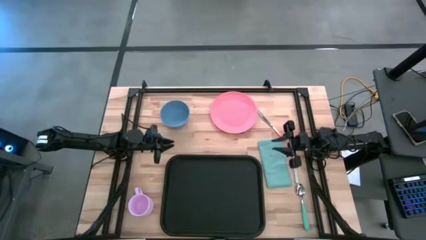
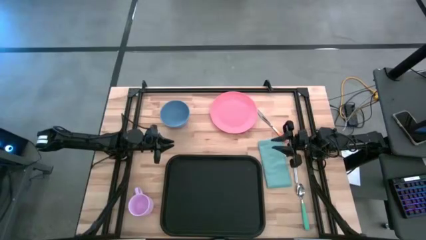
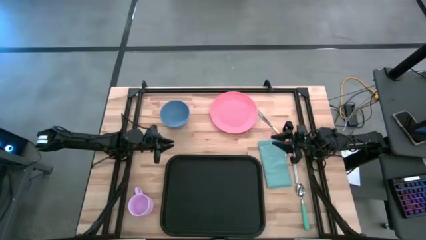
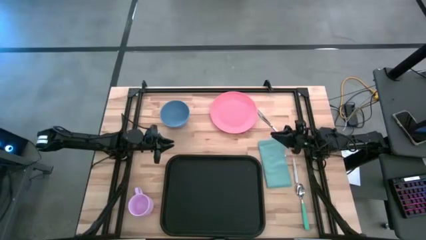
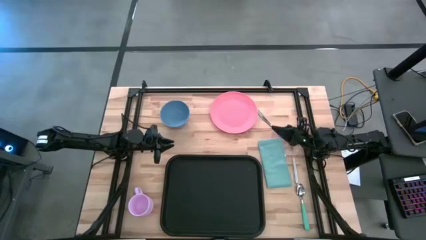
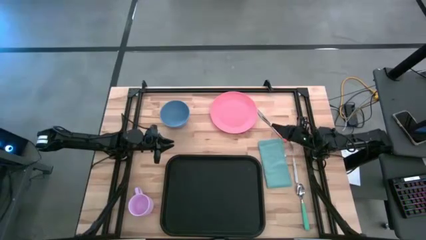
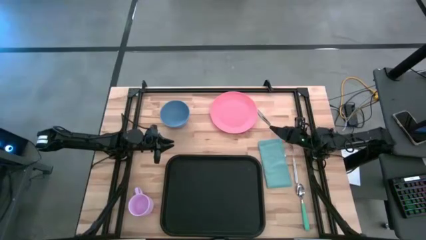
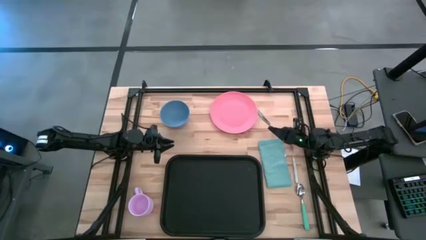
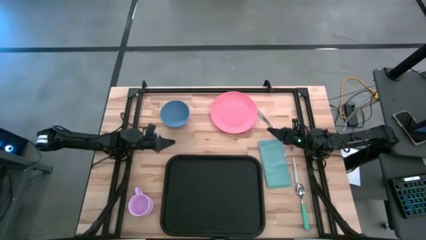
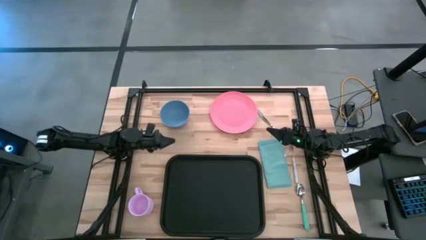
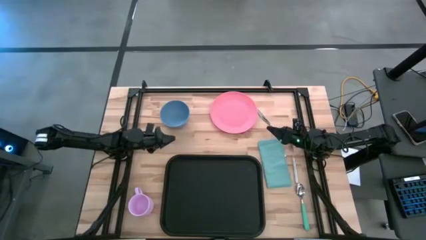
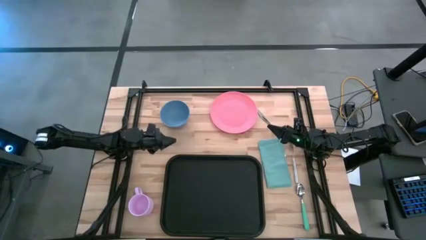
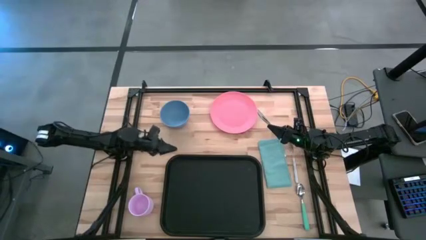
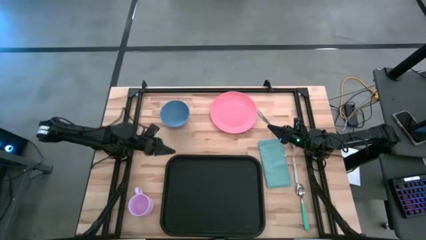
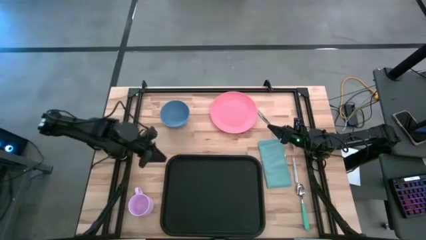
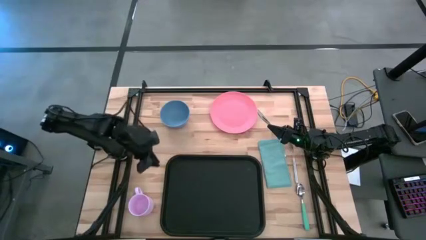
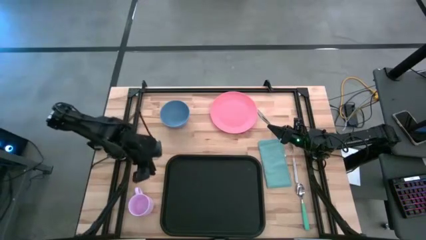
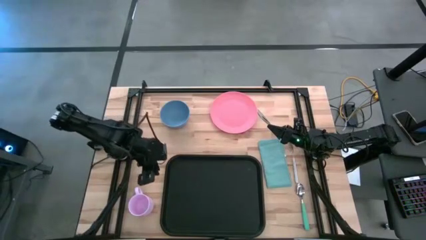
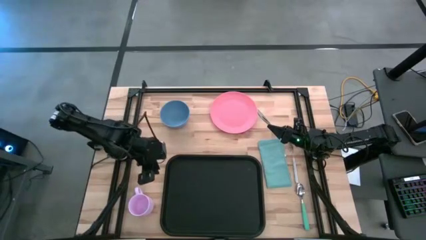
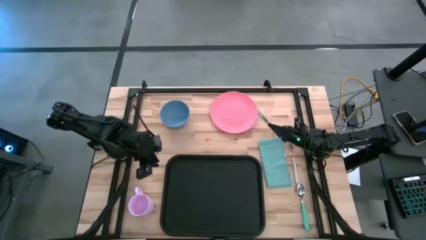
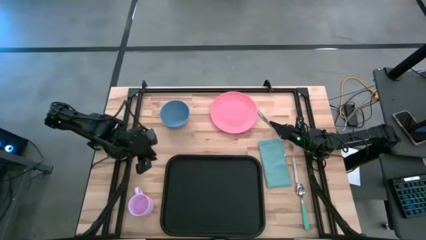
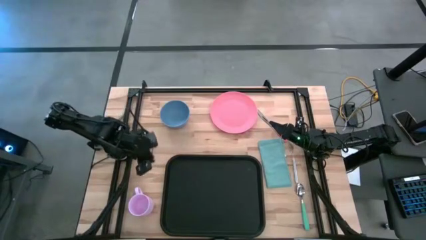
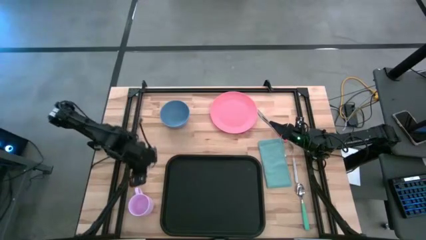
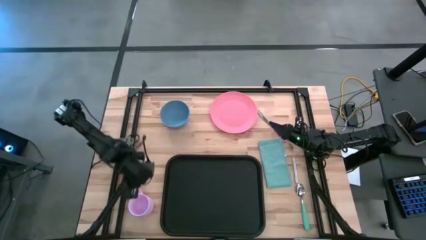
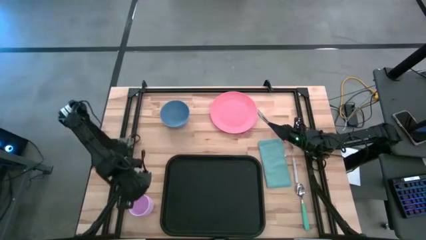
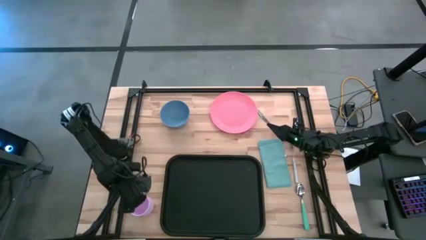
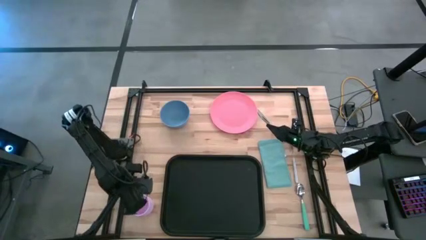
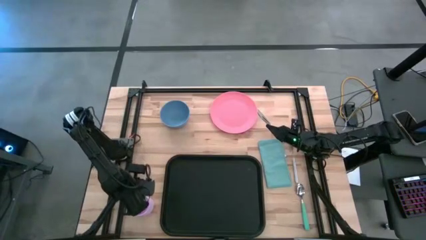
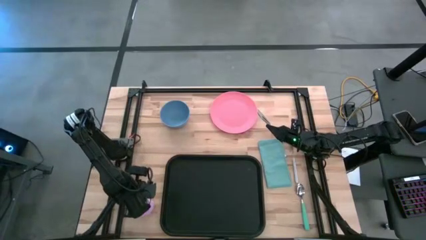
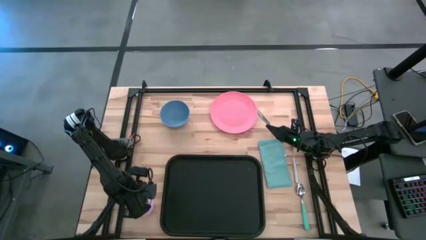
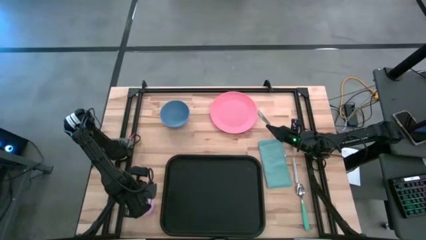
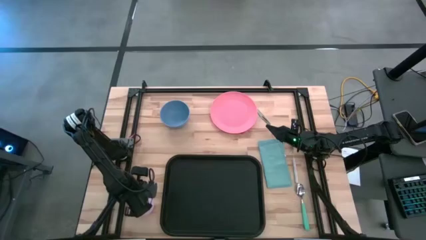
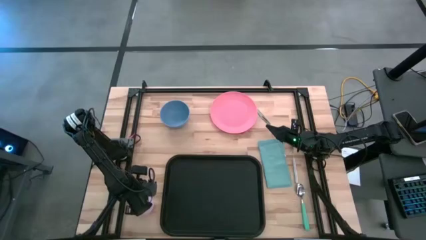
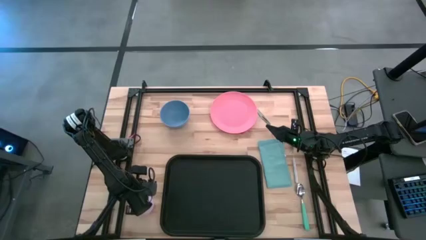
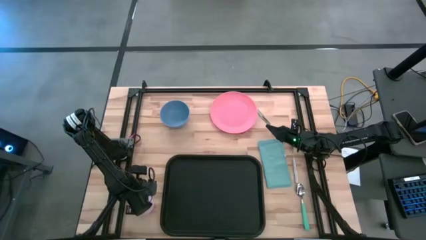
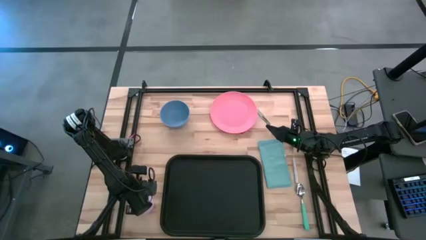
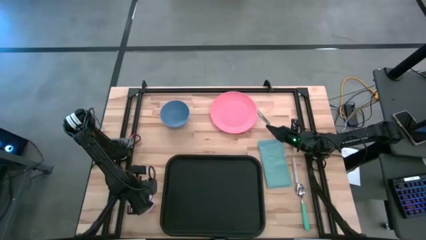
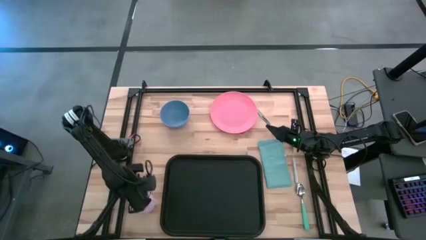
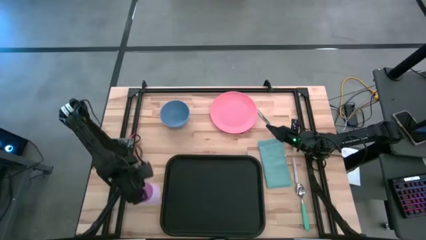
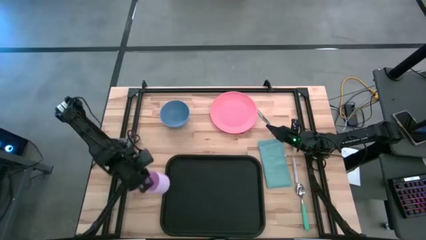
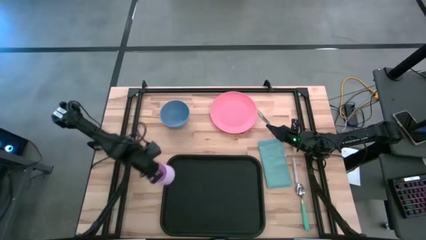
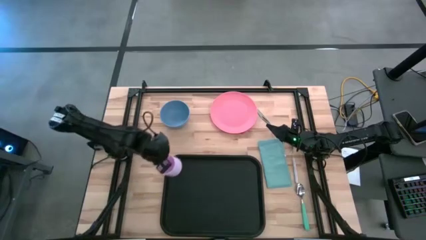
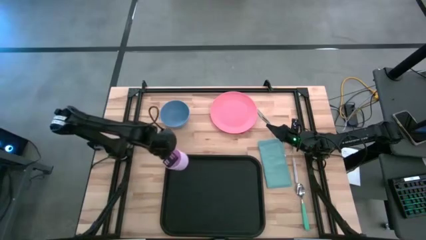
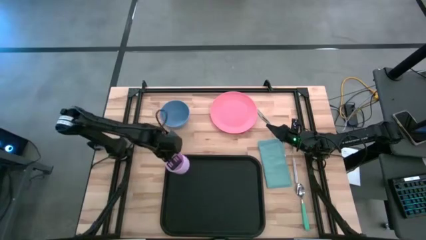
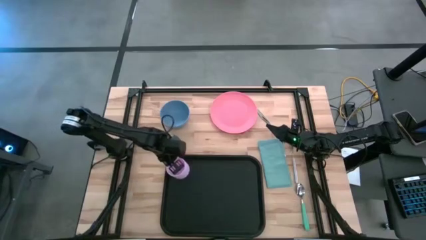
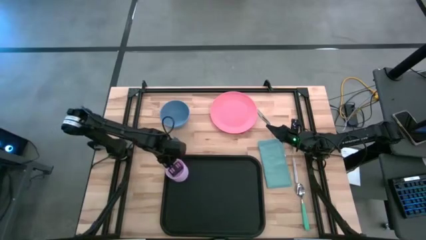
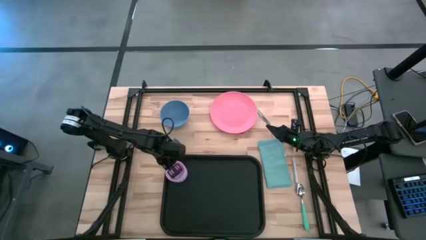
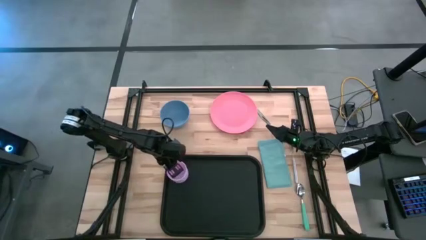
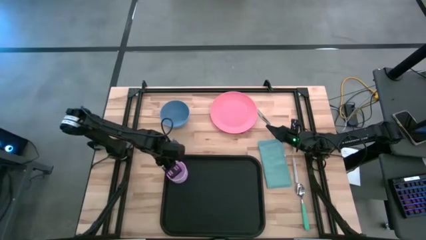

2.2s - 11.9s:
Task: Set up tray
Put the violet mug on the black tray

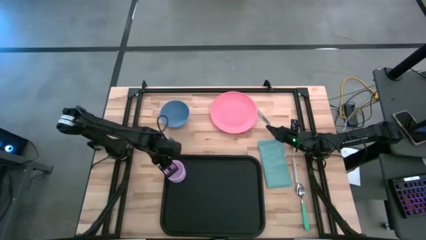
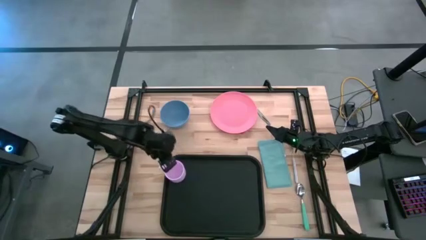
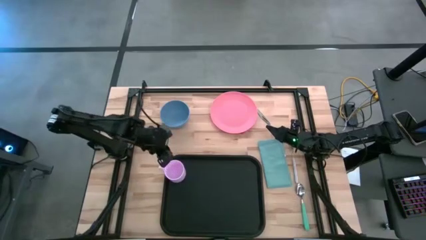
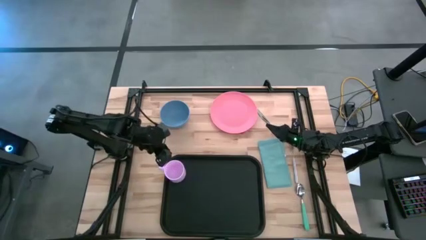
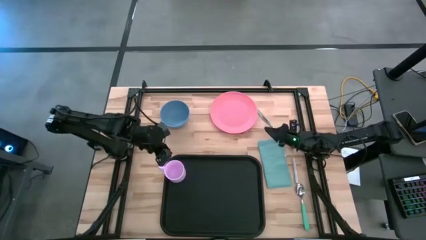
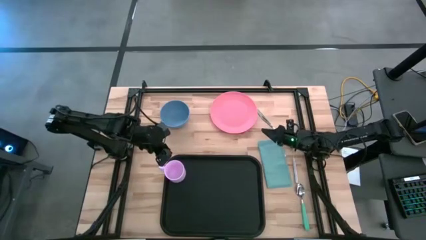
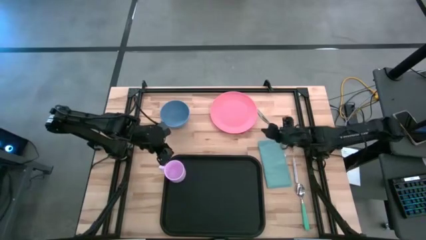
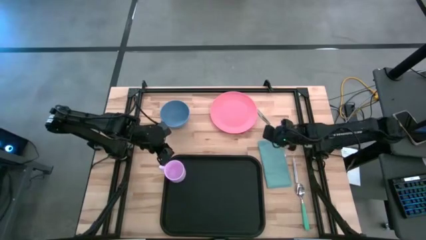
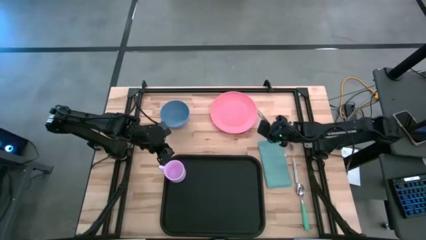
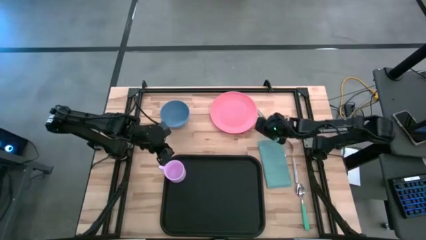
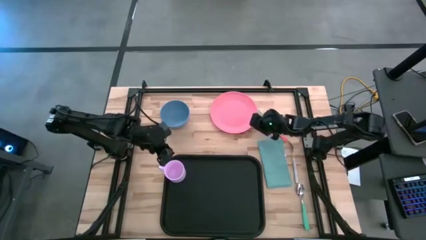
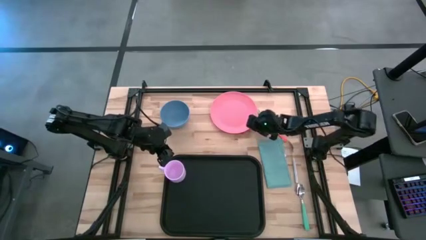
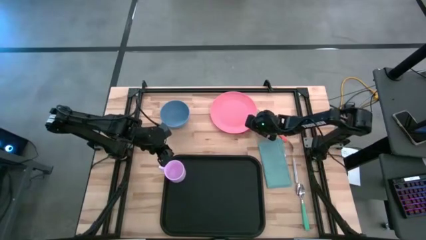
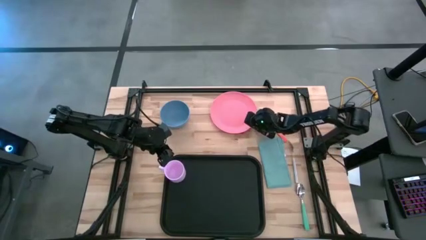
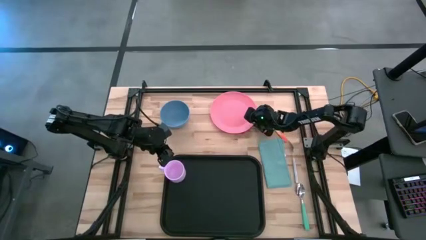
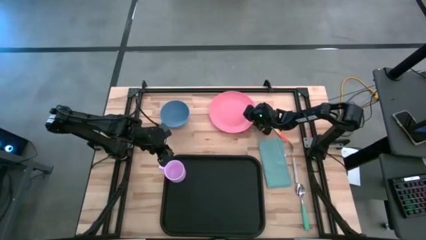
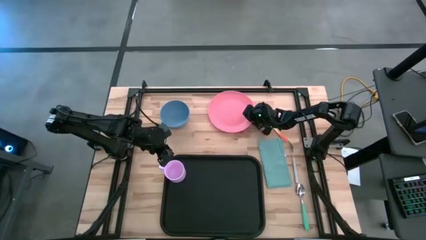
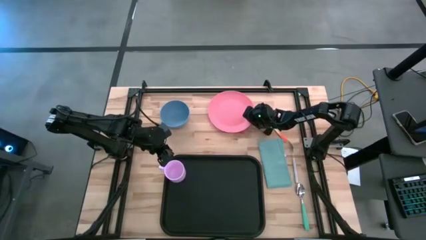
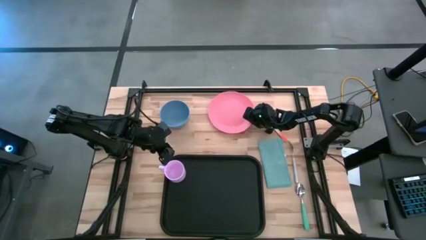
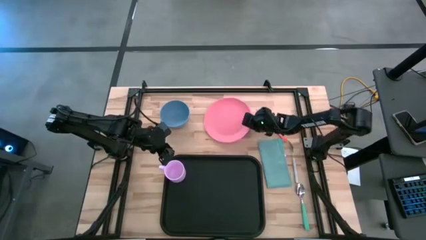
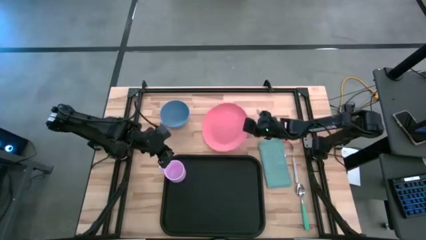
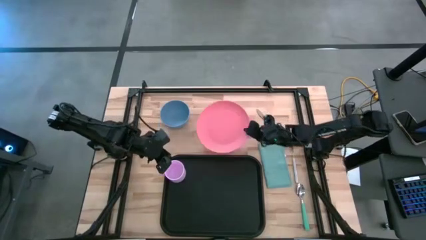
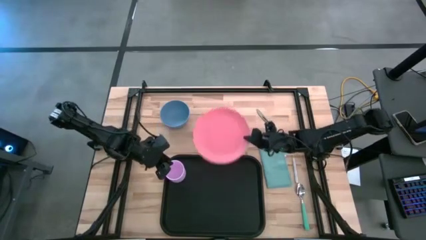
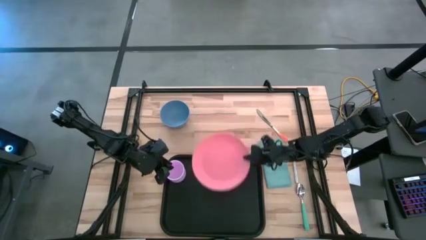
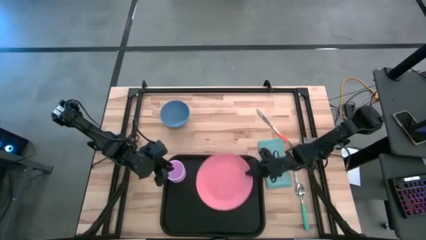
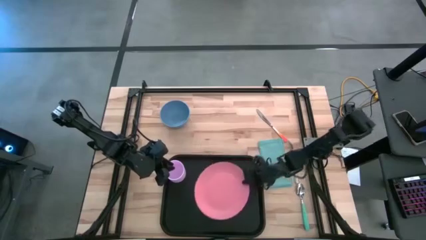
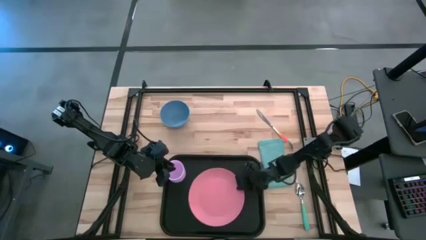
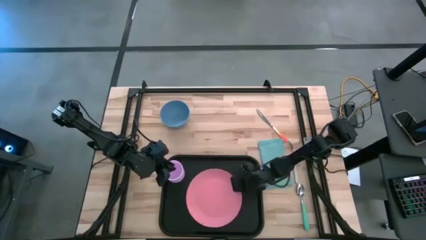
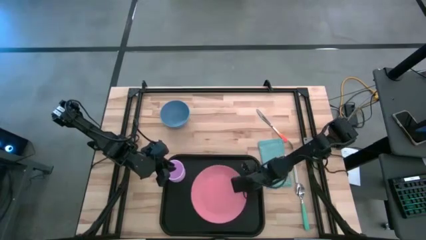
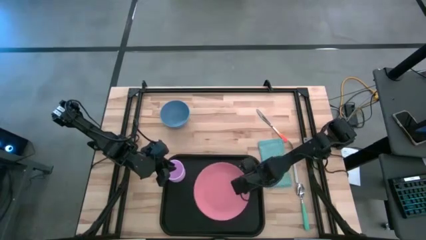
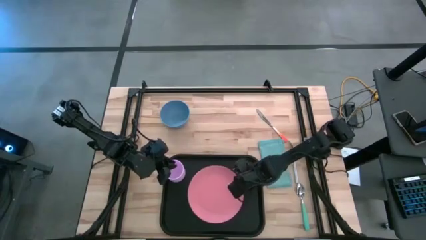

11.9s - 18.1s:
Put the pink plate on the black tray
